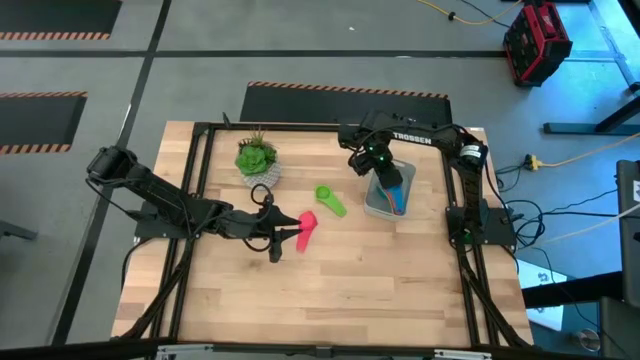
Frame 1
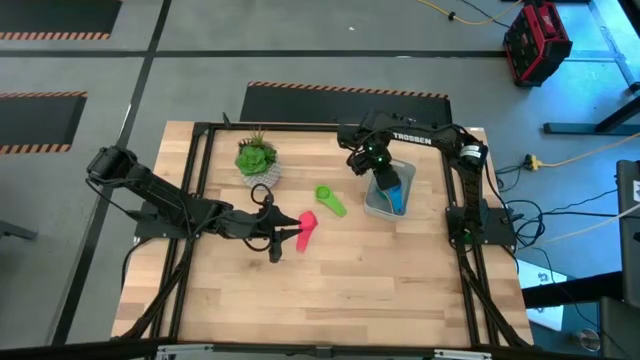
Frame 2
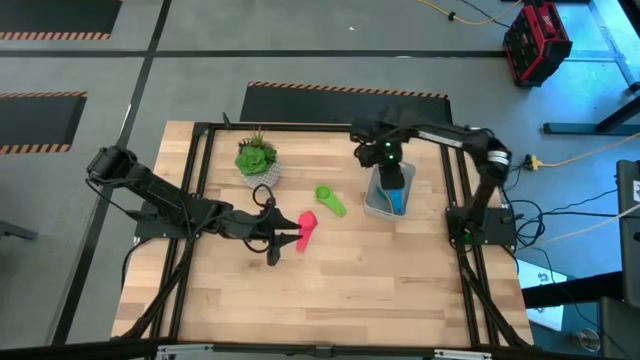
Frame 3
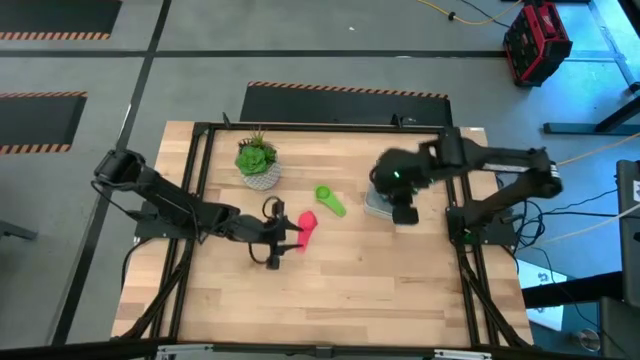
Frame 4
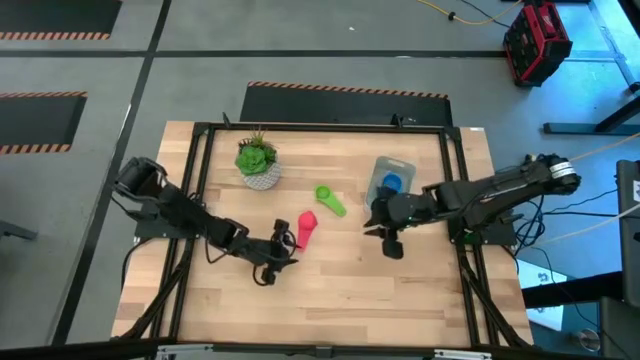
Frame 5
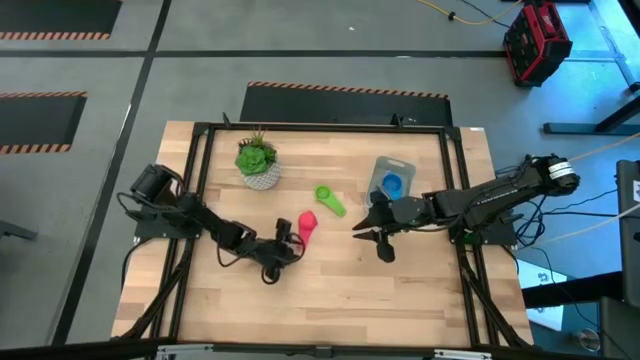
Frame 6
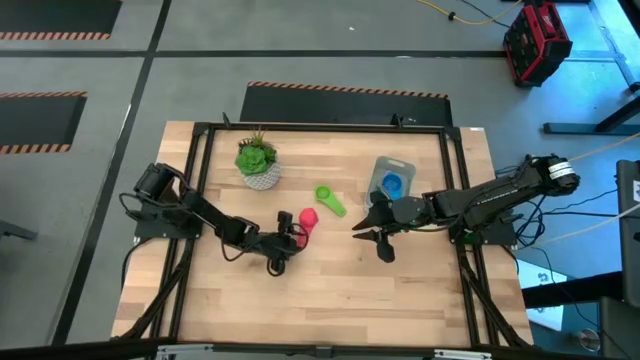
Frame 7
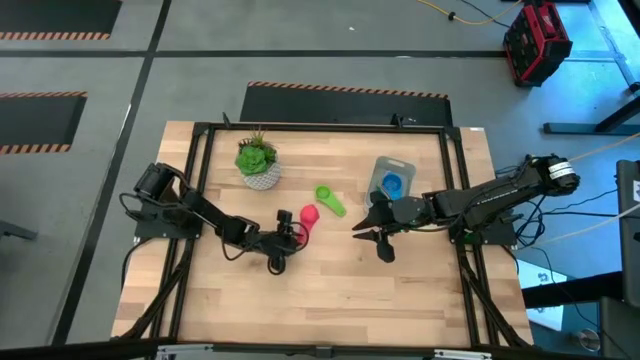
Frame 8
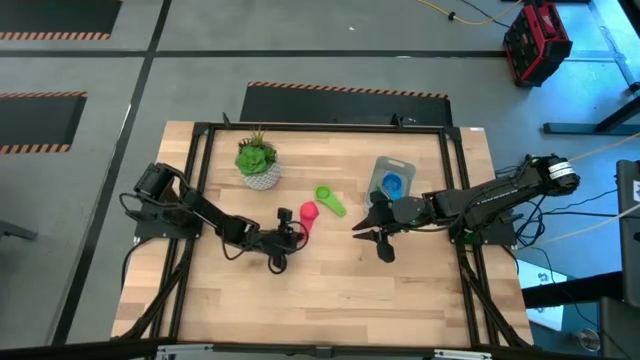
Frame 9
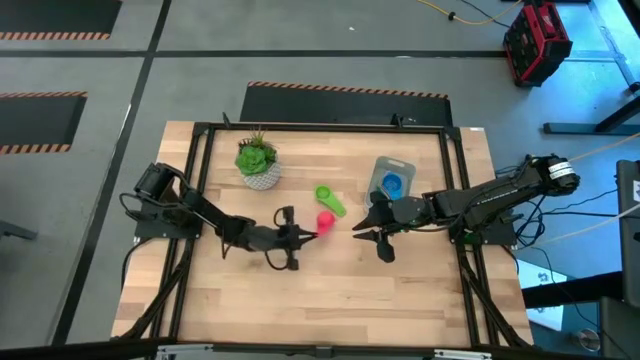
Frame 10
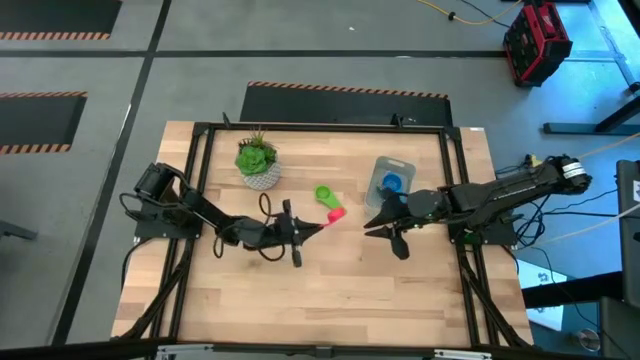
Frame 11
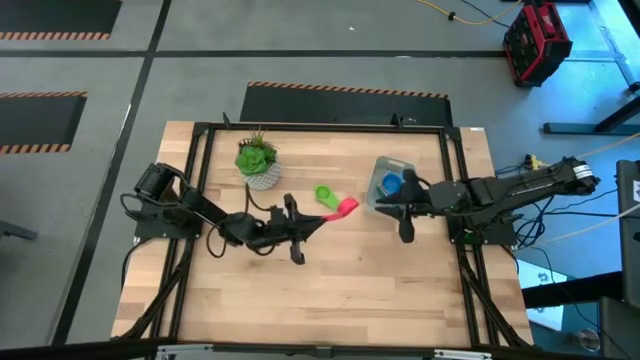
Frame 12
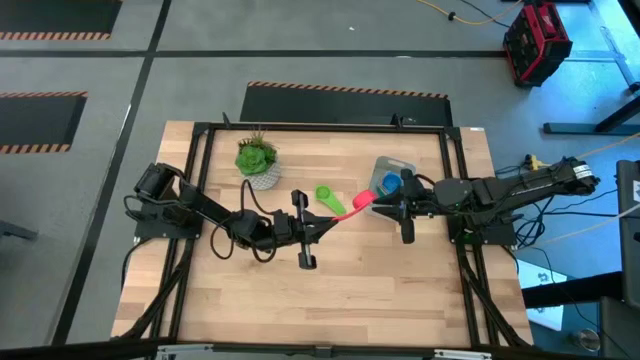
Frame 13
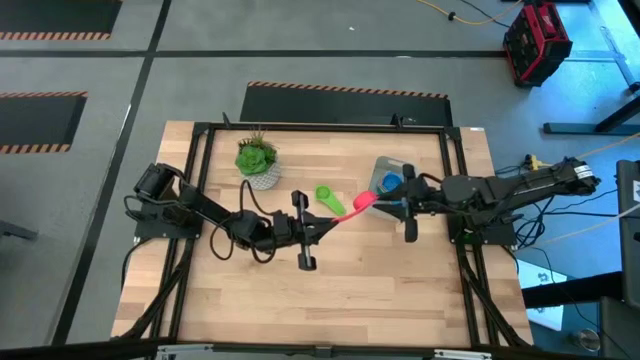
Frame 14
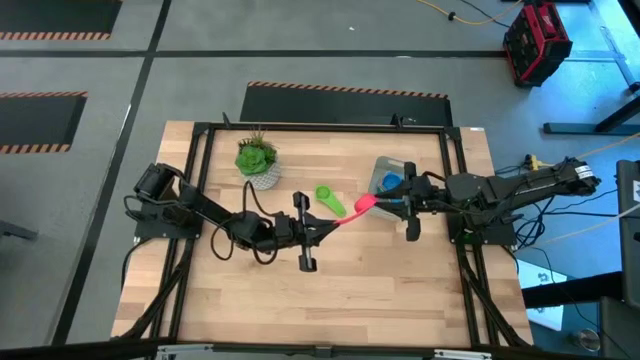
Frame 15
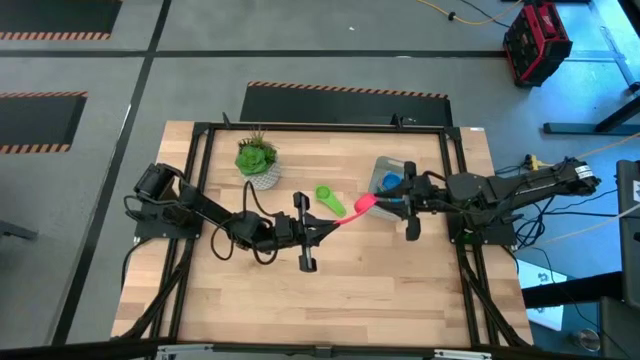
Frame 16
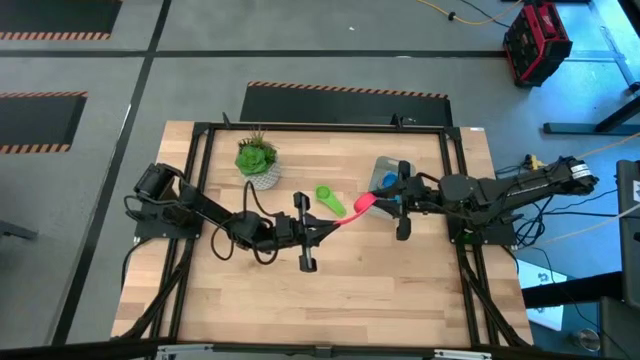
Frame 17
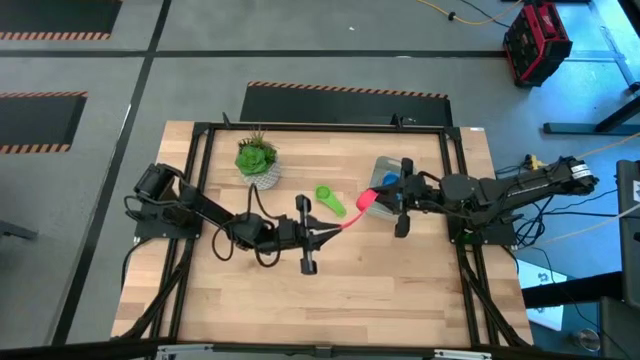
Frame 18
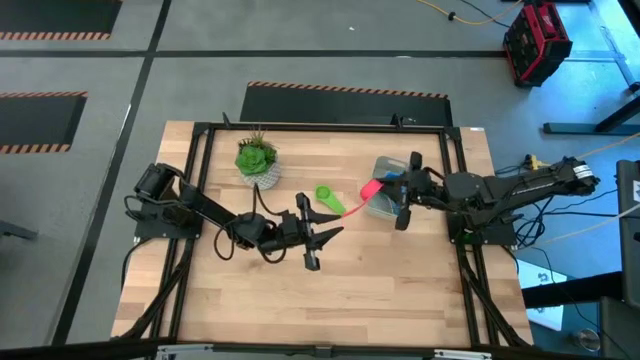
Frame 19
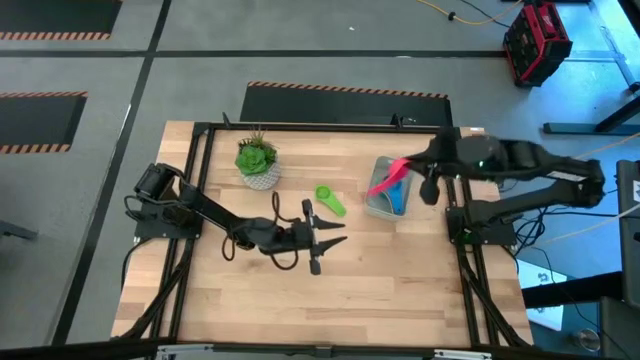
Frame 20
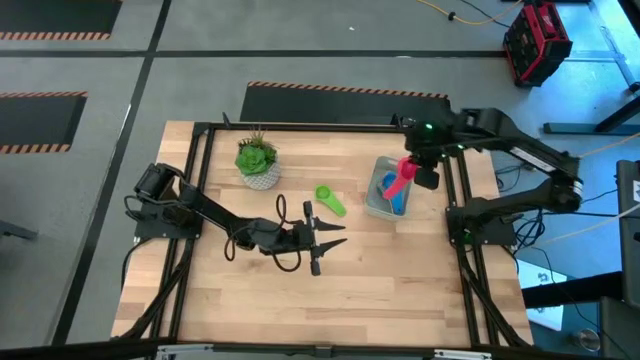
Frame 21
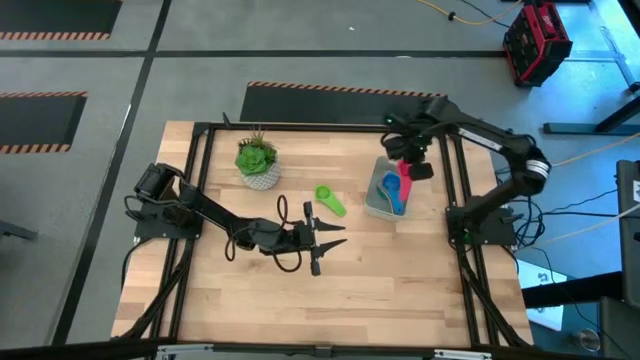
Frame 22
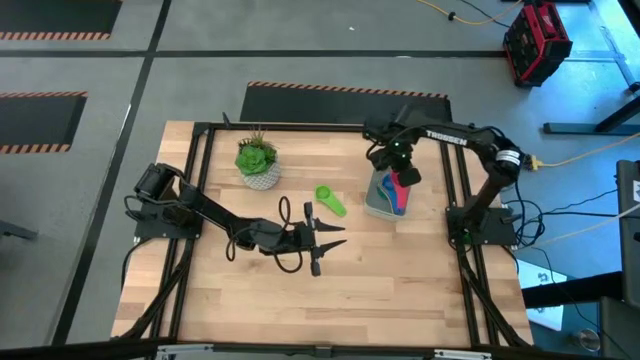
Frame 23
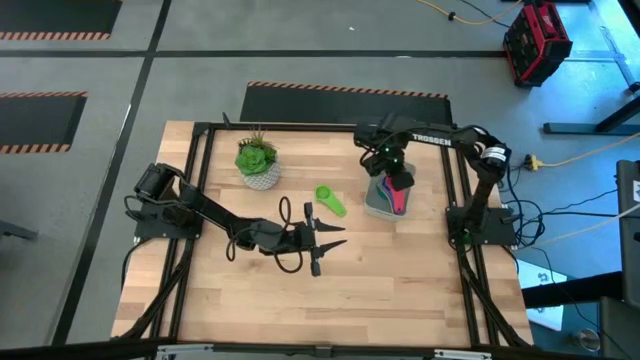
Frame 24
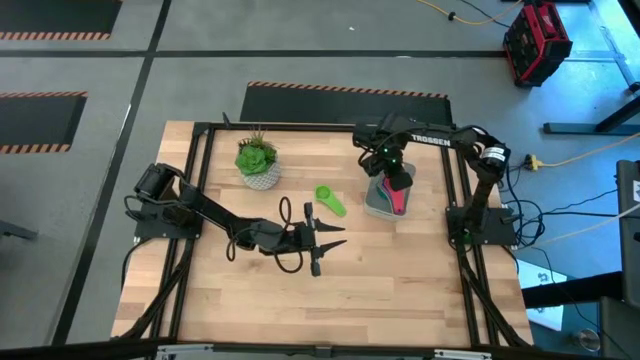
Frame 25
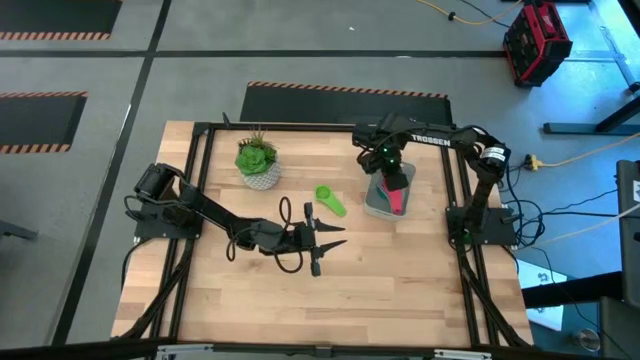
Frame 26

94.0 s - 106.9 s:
Task: Nest measuring cups in basket
Stack the red measuring cup on top of the light blue measuring cup in the gray bin

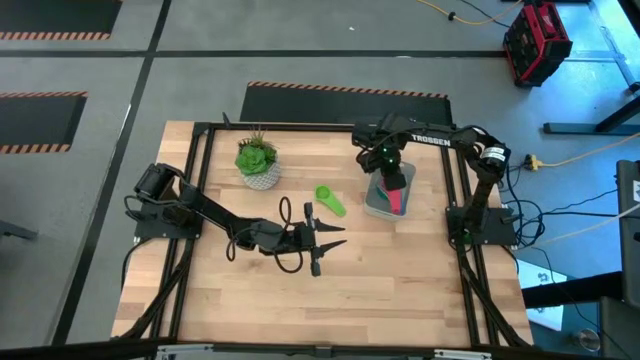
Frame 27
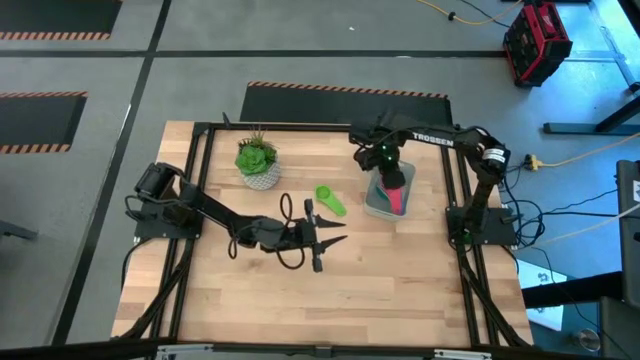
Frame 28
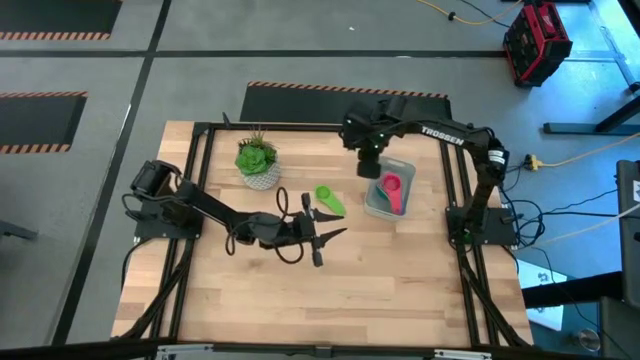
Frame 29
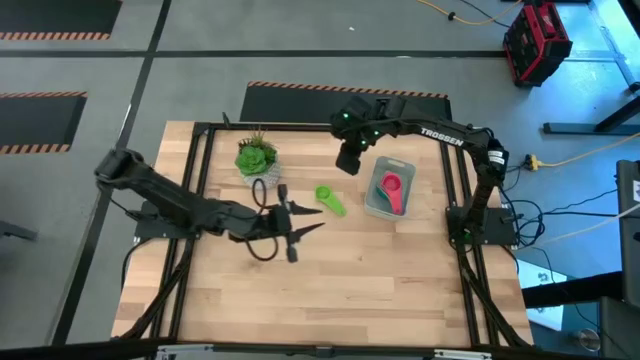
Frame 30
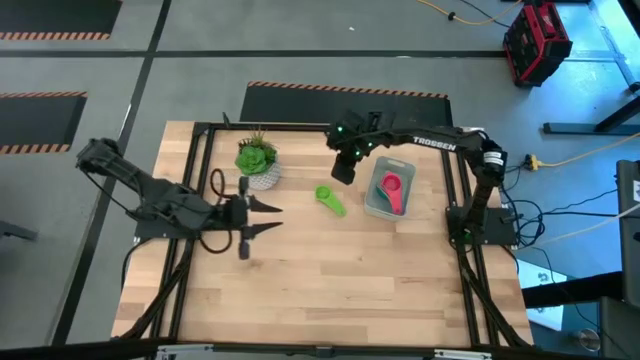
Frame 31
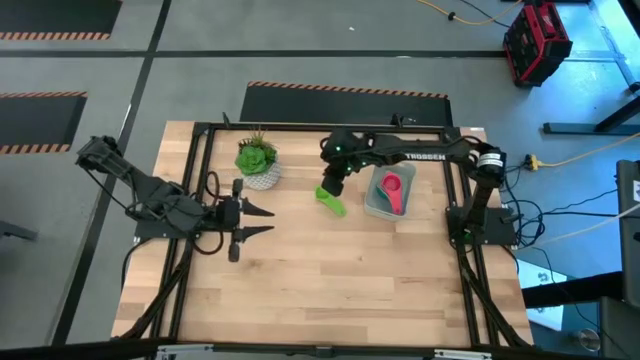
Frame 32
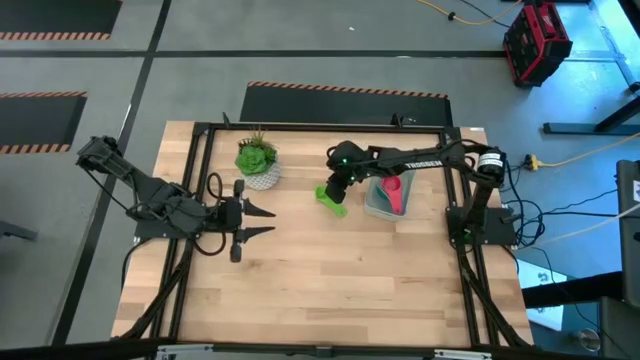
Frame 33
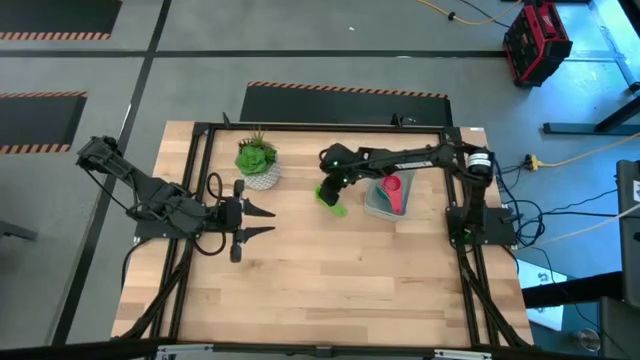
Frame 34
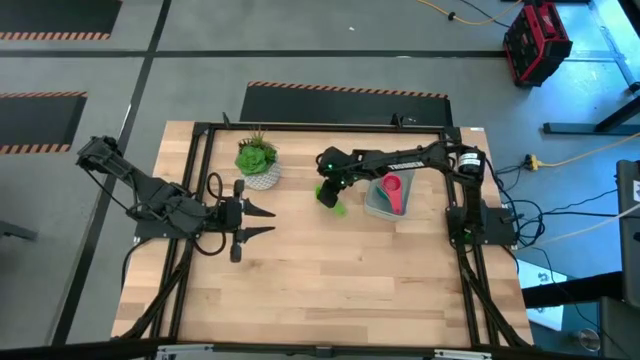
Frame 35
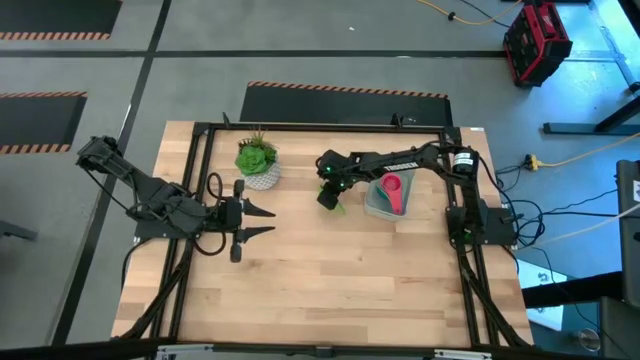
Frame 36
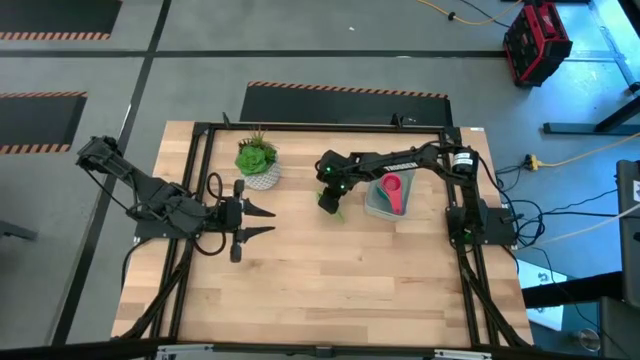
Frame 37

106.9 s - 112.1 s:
Stack the green measuring cup on top of the red measuring cup in the gray bin

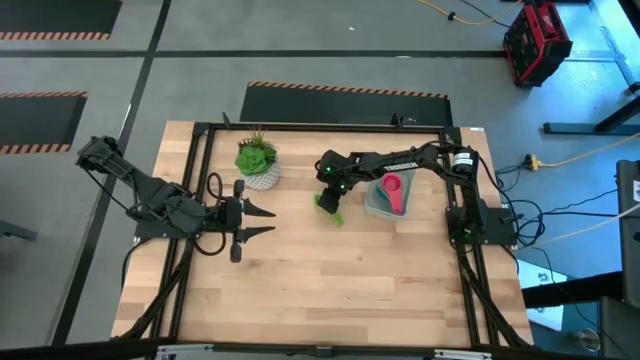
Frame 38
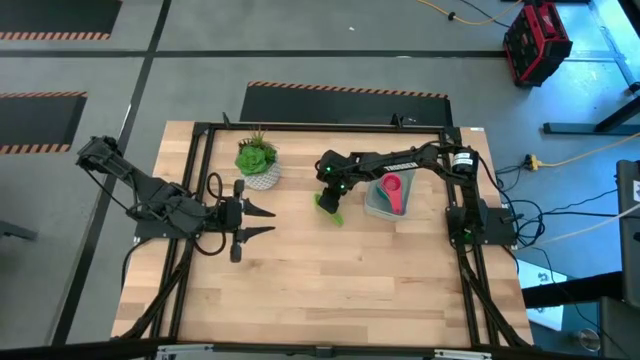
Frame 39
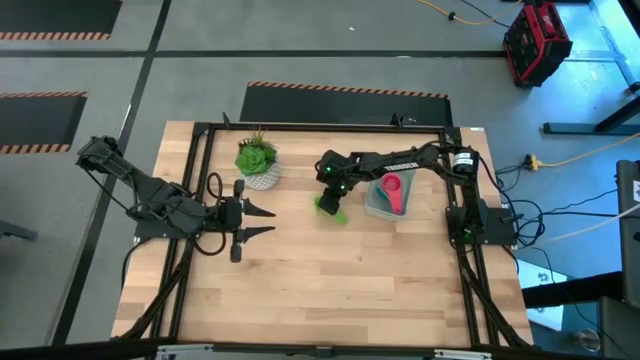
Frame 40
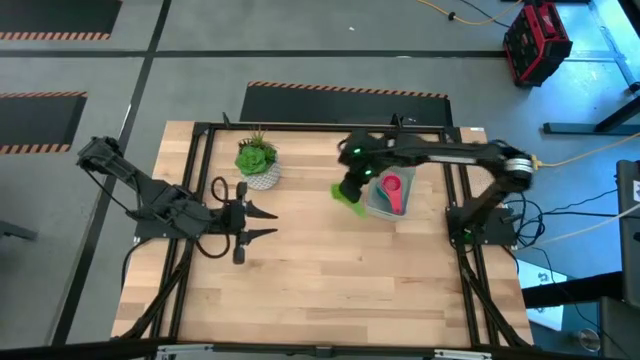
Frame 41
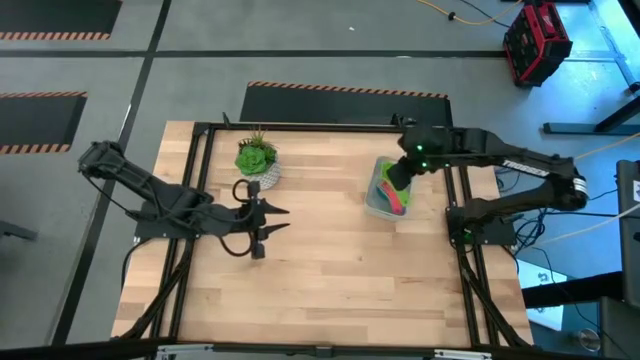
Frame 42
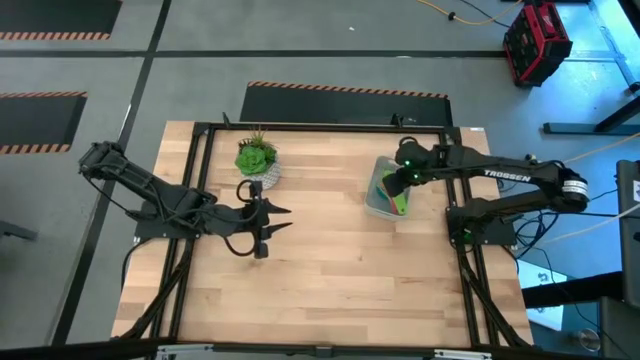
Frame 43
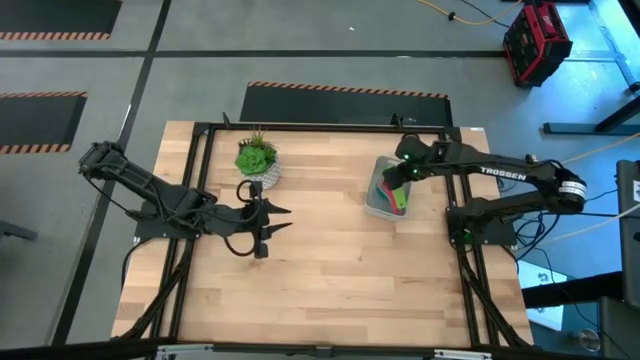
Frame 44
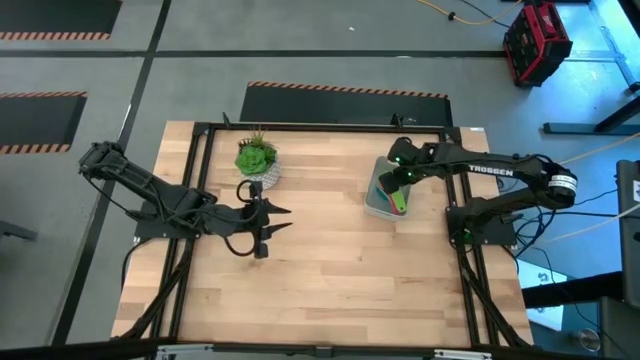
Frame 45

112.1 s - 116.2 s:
Stack the green measuring cup on top of the red measuring cup in the gray bin
